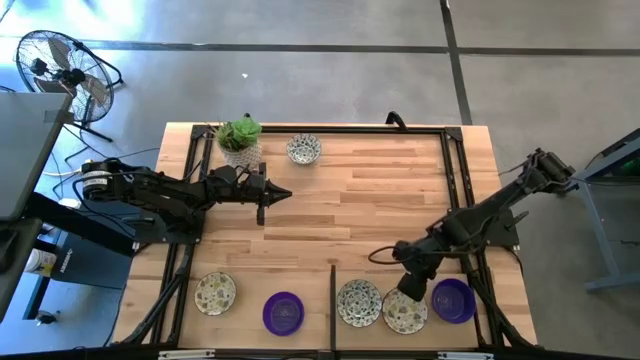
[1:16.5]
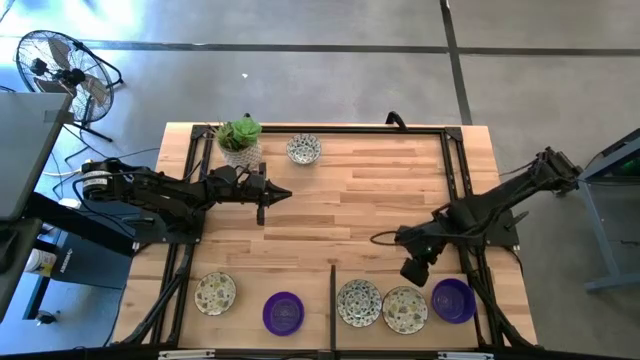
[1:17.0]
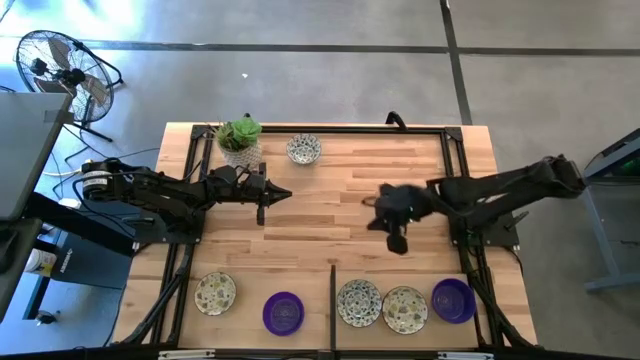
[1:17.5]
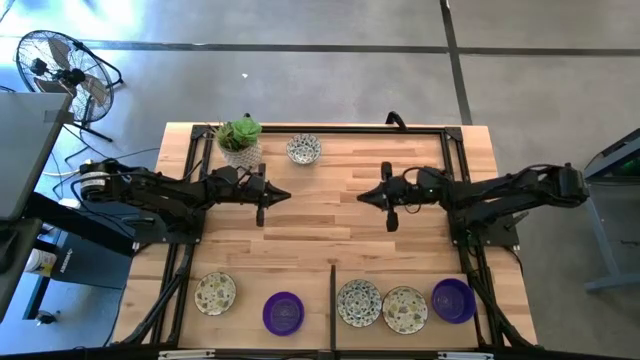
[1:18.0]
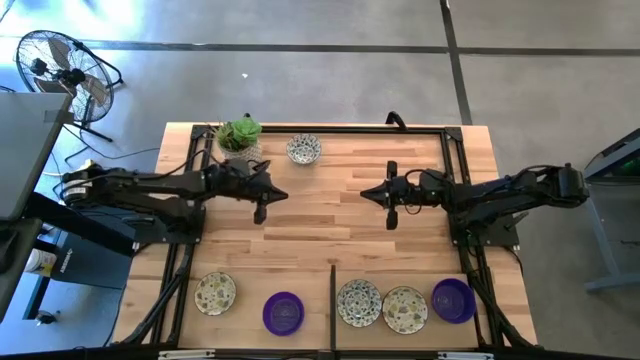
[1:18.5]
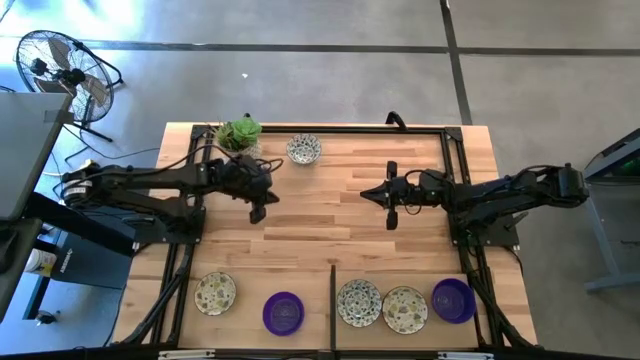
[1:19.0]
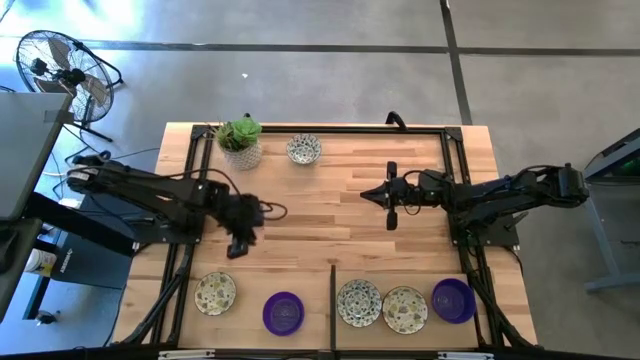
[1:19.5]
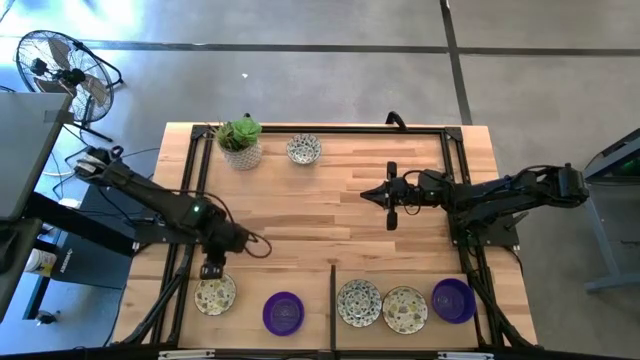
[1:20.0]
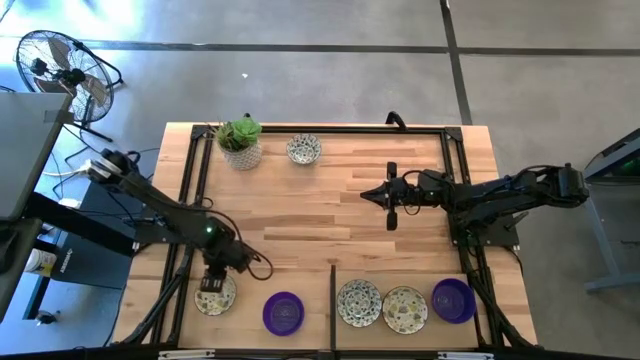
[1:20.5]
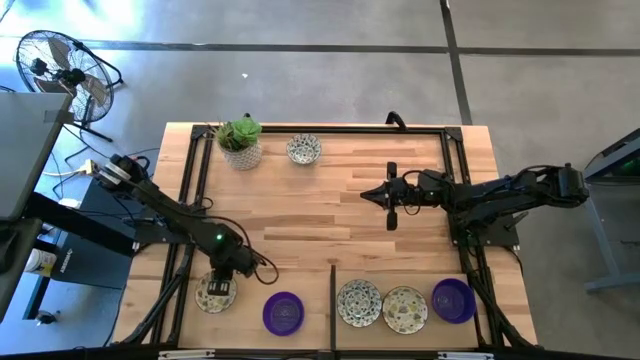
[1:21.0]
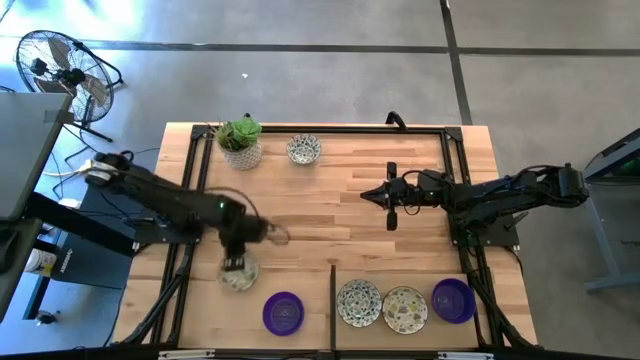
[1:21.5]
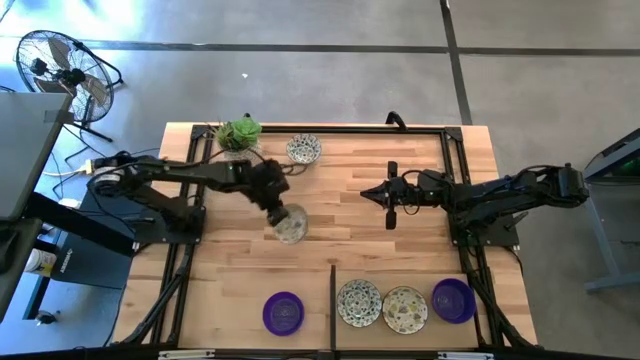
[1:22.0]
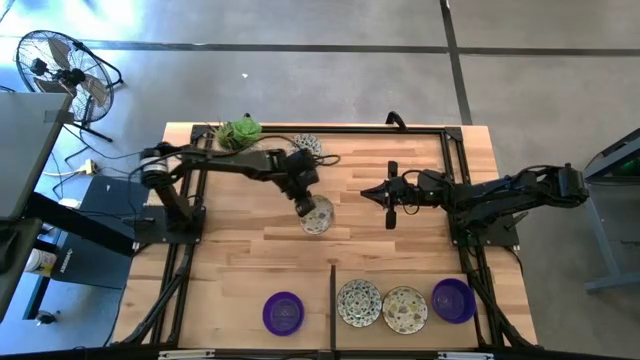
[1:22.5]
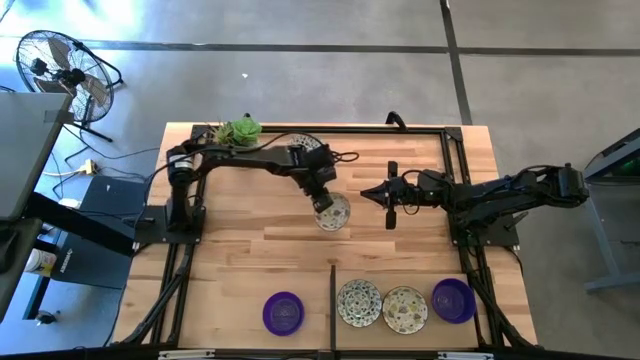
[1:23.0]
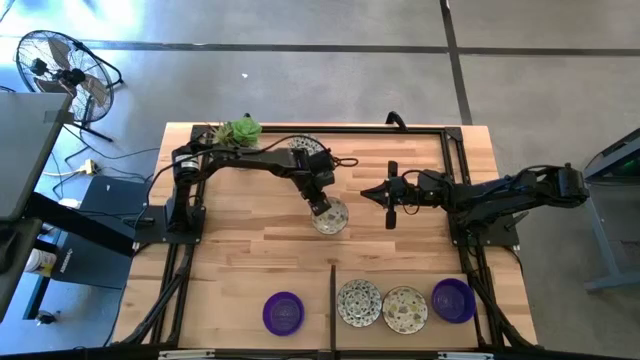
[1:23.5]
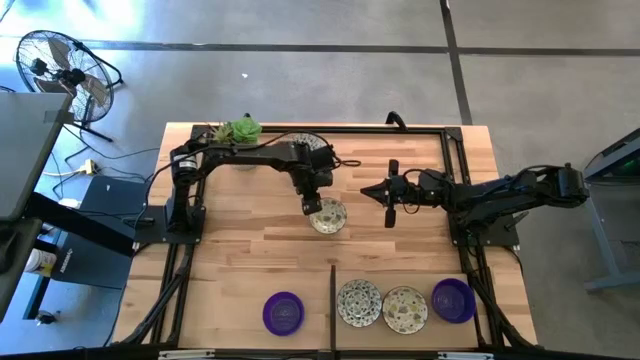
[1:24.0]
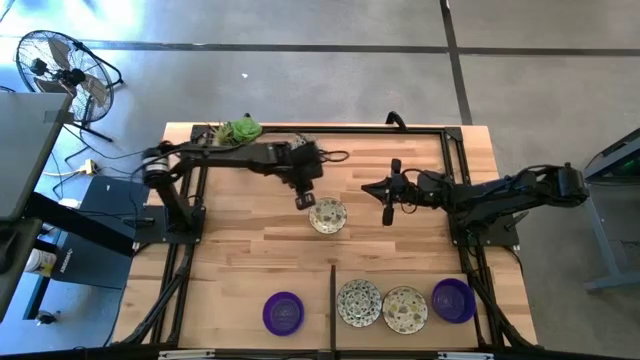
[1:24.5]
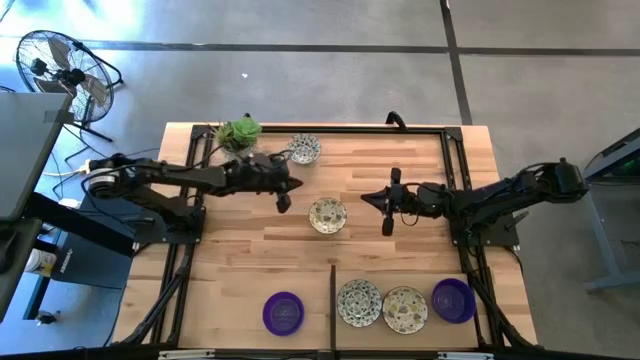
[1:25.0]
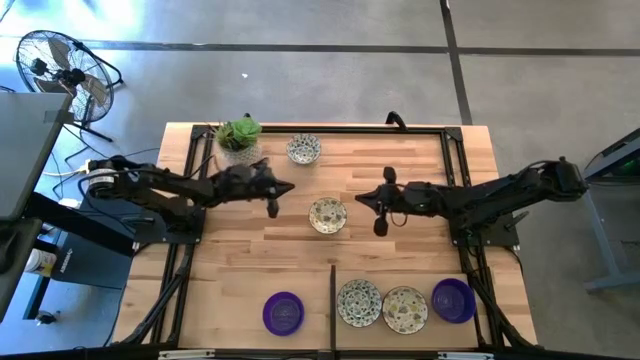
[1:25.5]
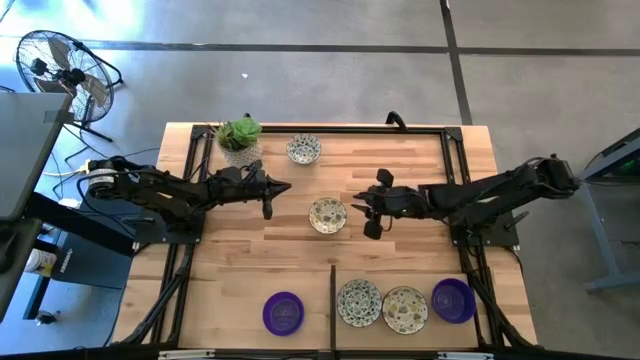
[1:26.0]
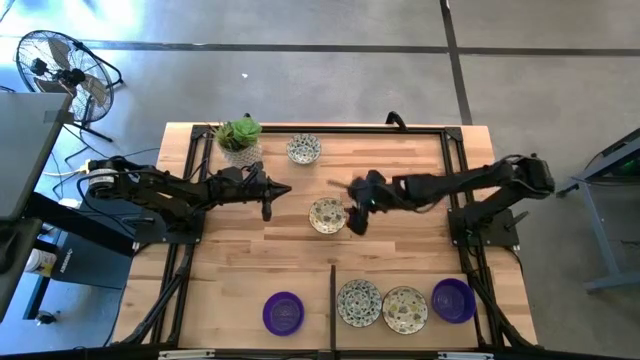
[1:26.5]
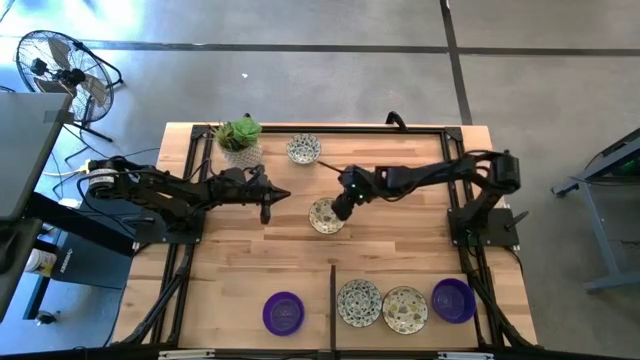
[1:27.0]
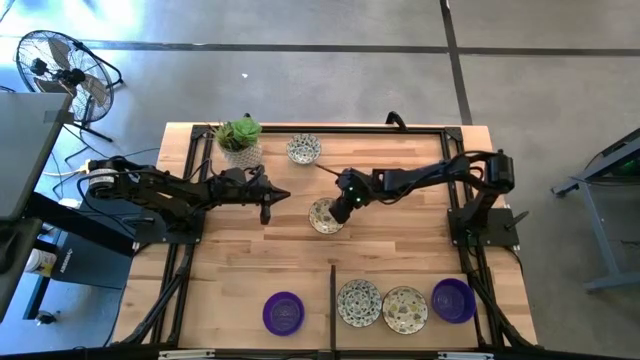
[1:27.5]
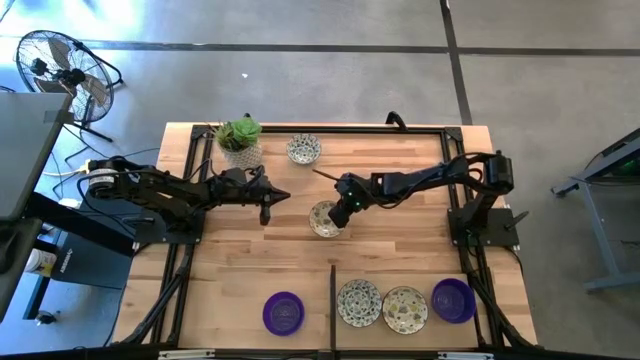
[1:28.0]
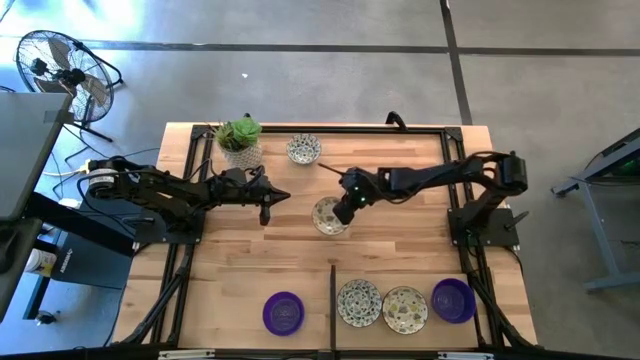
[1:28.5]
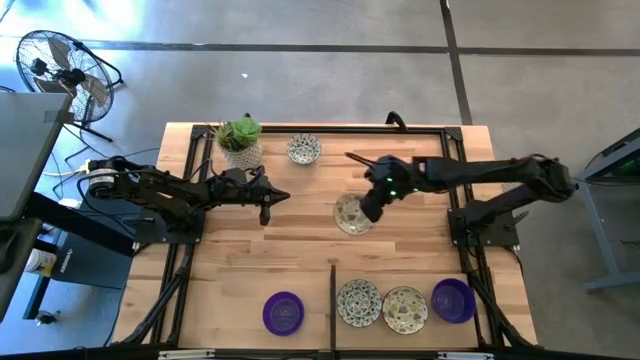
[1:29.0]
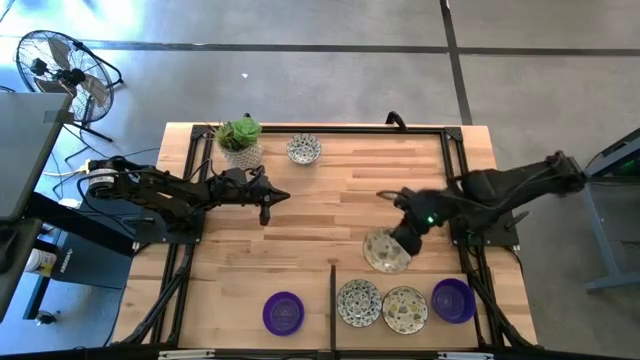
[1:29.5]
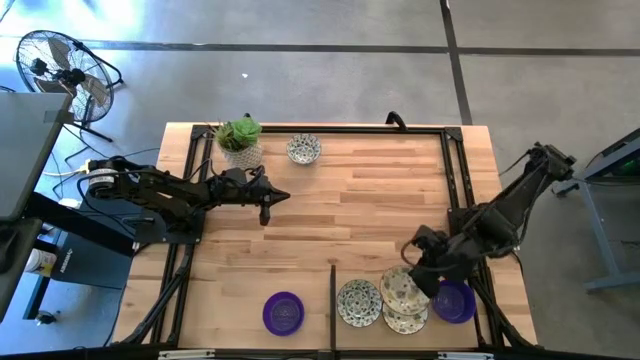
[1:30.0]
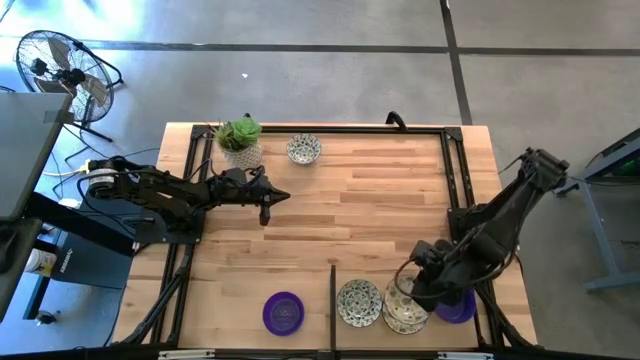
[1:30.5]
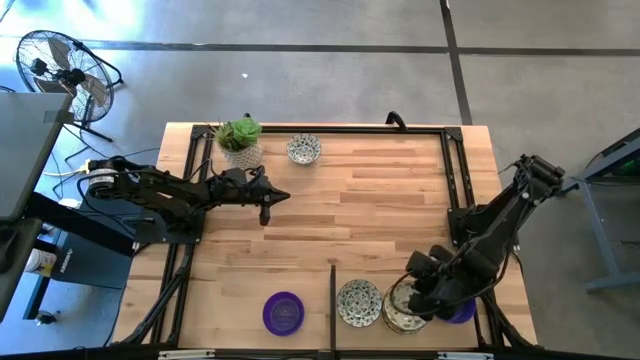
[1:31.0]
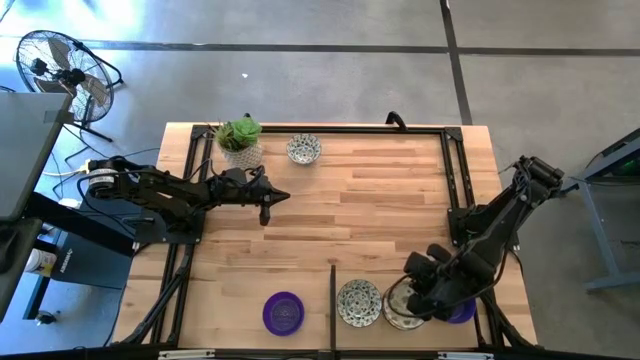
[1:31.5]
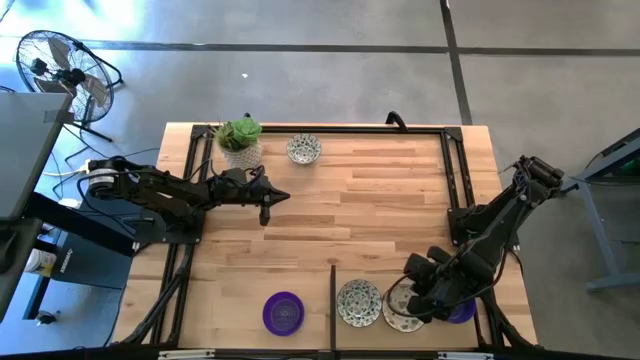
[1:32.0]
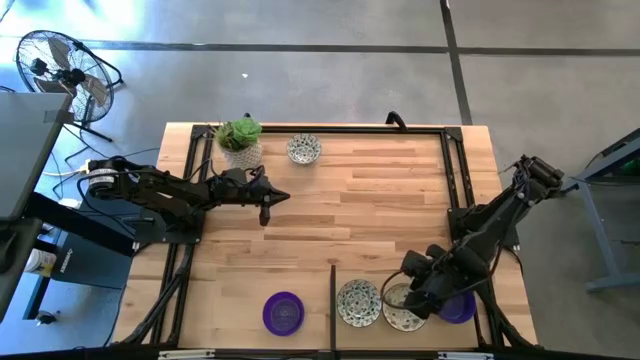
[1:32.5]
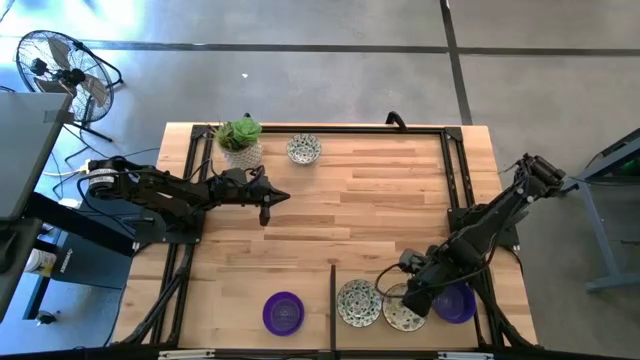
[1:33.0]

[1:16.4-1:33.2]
Task: Pick & Place Mini bowls
Stack the yellow patterned bowl on the yellow patterned bowls on the shelf

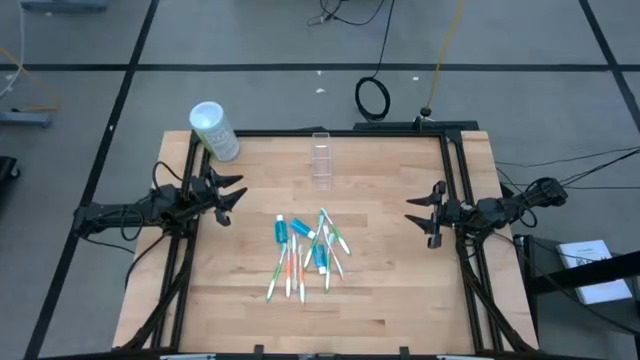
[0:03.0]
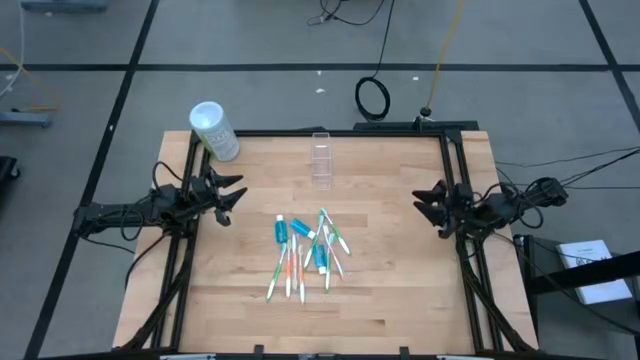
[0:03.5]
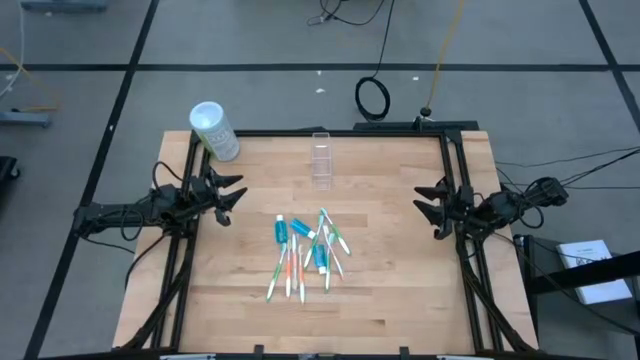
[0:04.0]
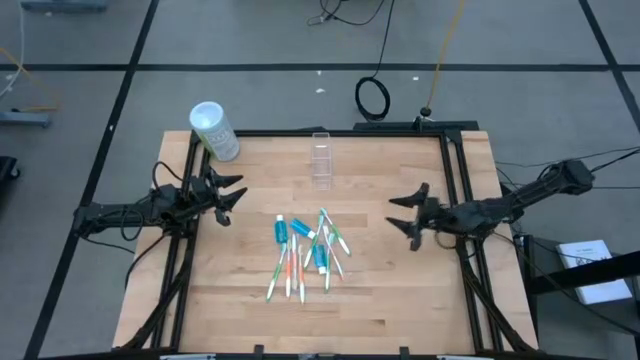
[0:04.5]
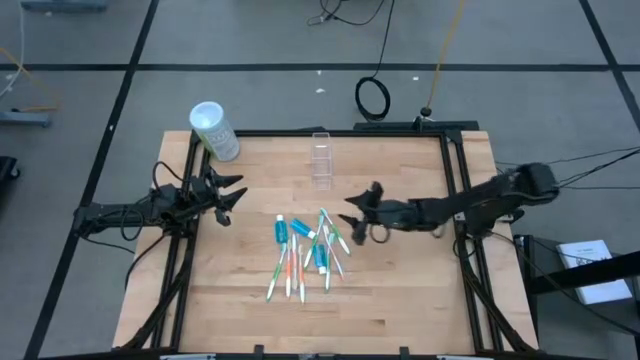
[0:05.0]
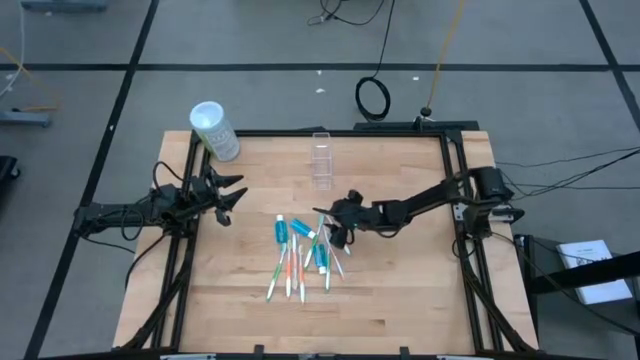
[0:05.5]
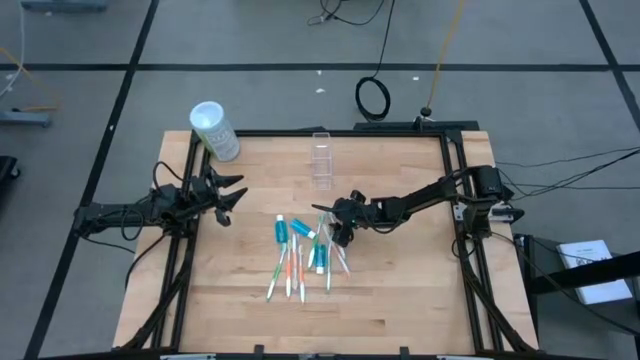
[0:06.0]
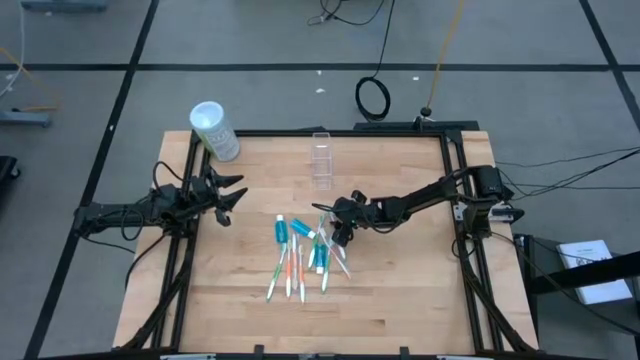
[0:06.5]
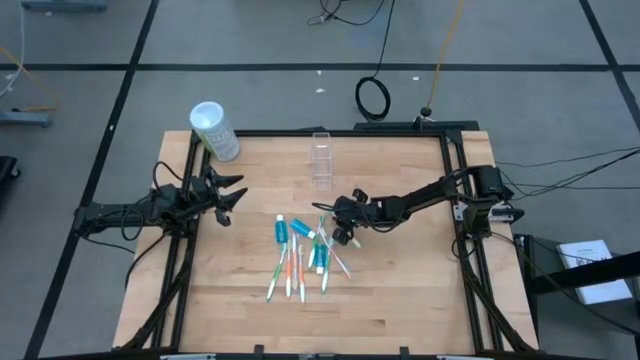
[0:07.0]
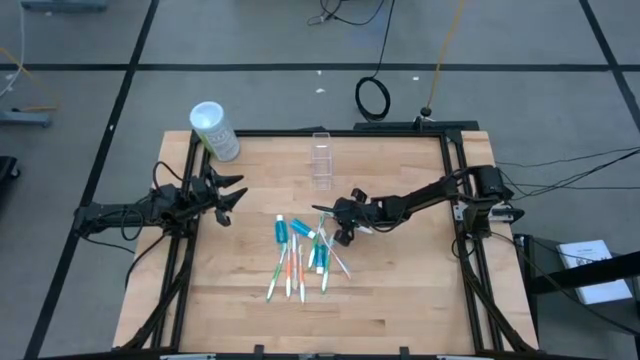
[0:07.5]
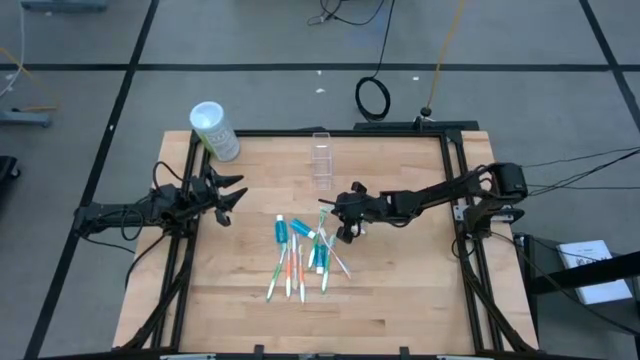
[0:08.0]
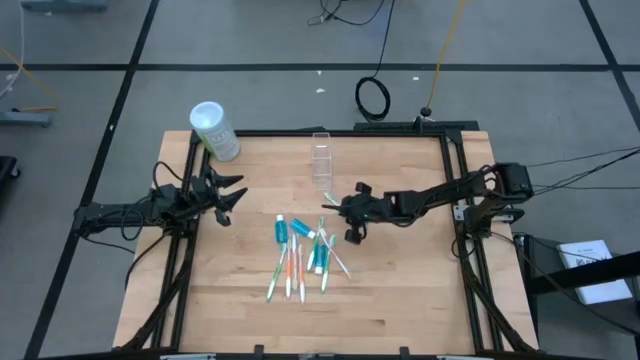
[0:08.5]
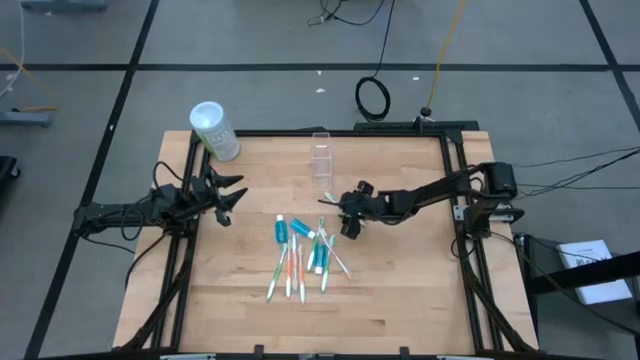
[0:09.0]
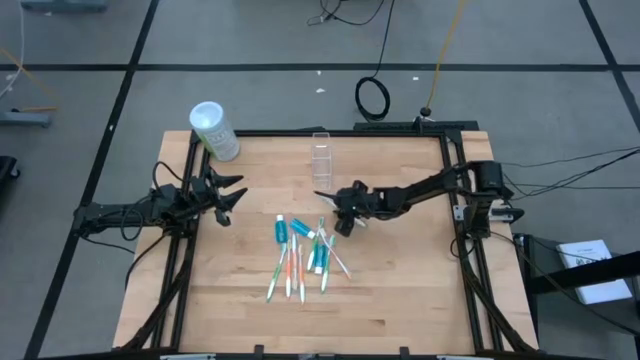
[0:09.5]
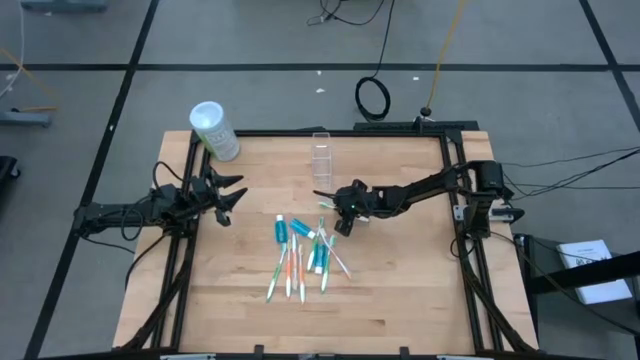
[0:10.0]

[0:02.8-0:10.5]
Task: Pick & Place toothbrushing station
Put the green toothbrush into the transparent organizer
